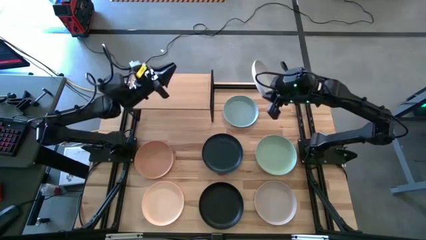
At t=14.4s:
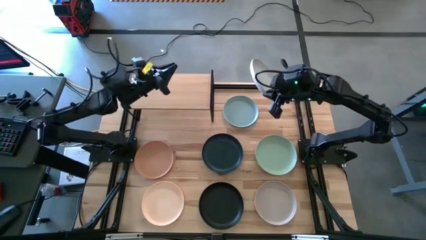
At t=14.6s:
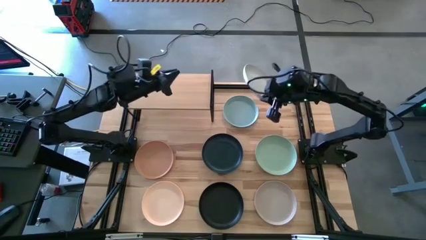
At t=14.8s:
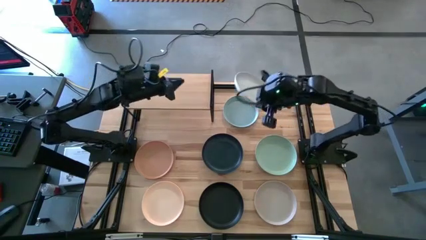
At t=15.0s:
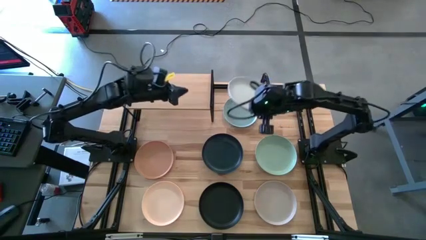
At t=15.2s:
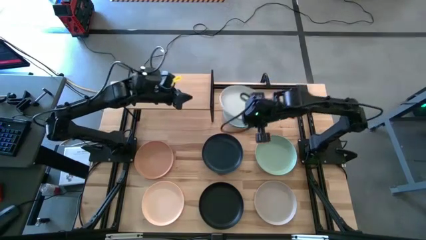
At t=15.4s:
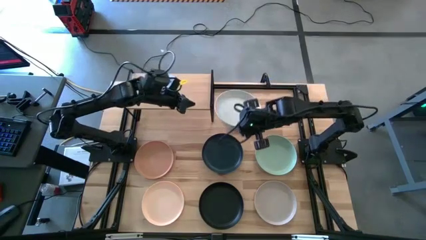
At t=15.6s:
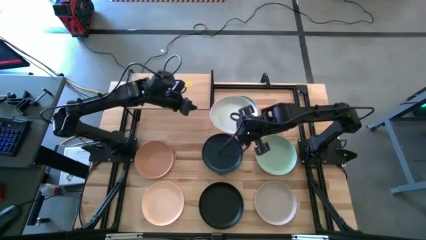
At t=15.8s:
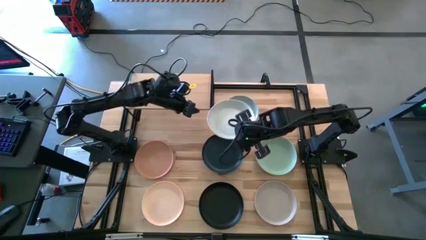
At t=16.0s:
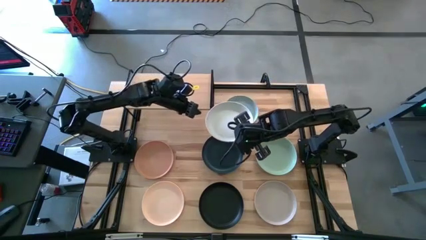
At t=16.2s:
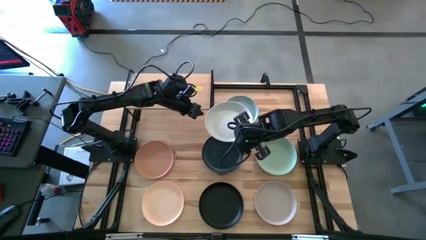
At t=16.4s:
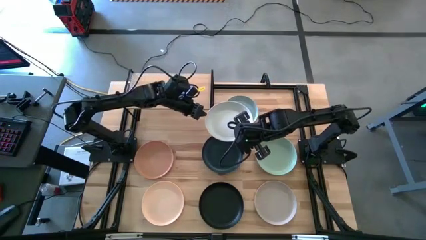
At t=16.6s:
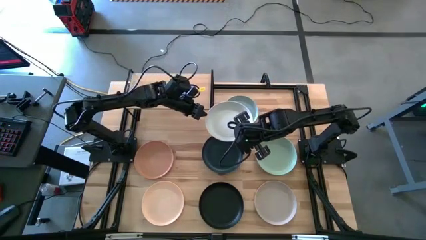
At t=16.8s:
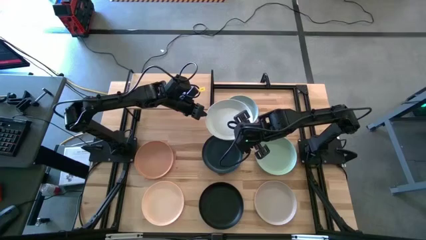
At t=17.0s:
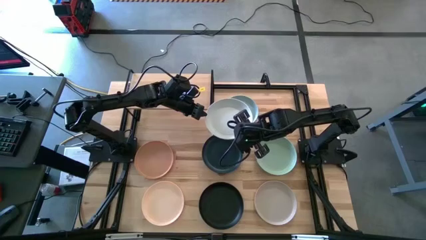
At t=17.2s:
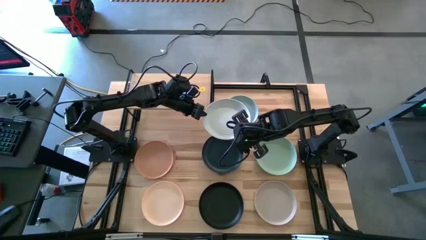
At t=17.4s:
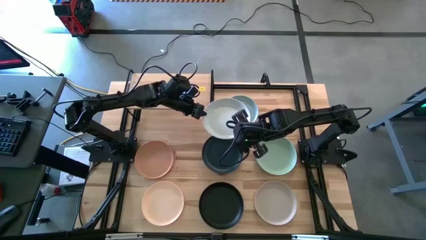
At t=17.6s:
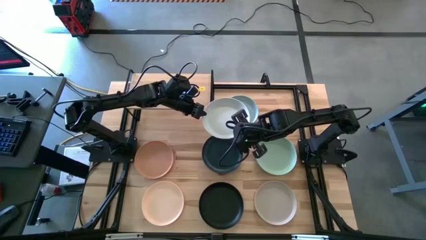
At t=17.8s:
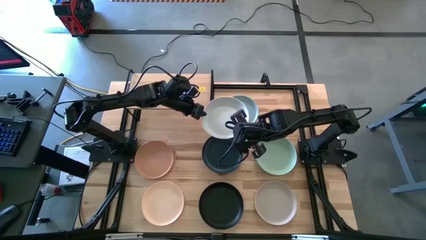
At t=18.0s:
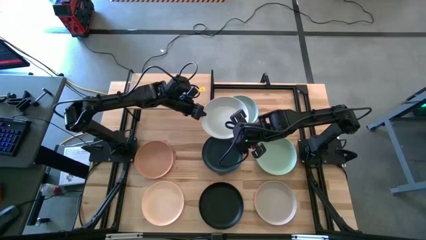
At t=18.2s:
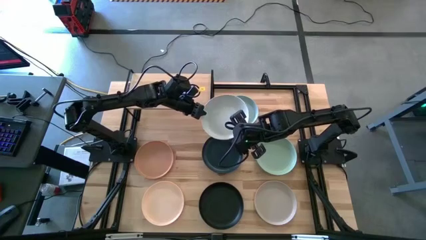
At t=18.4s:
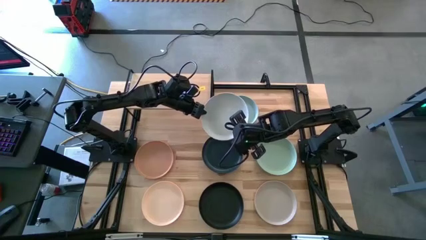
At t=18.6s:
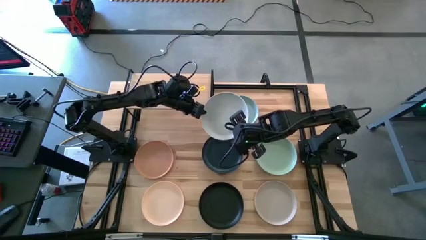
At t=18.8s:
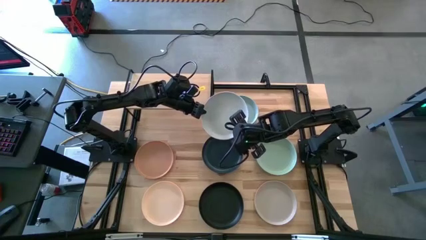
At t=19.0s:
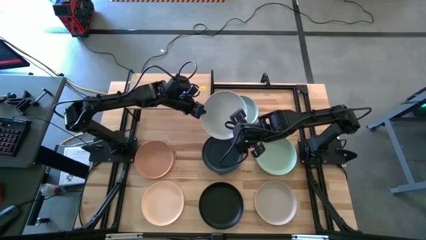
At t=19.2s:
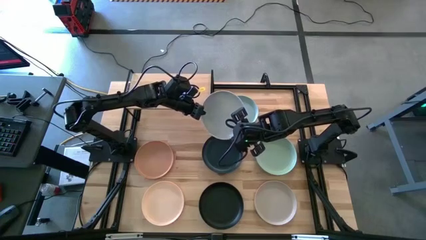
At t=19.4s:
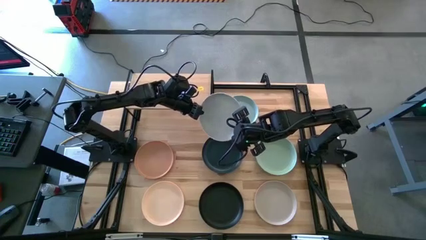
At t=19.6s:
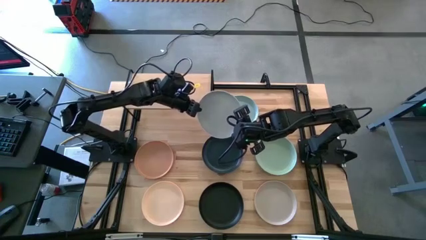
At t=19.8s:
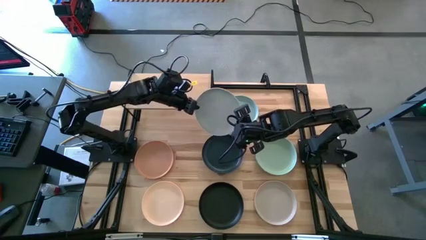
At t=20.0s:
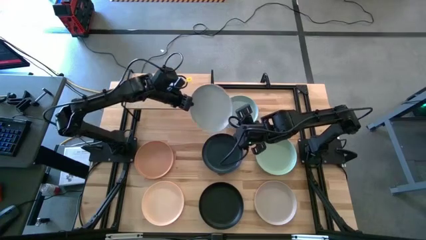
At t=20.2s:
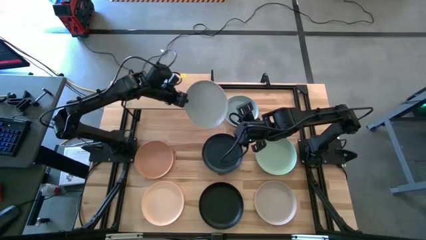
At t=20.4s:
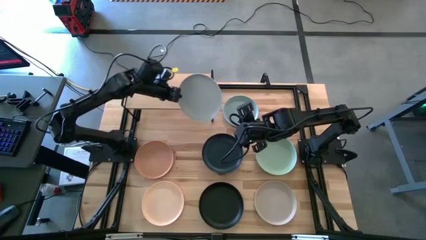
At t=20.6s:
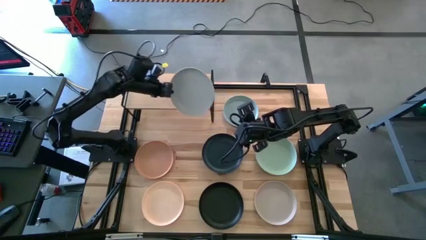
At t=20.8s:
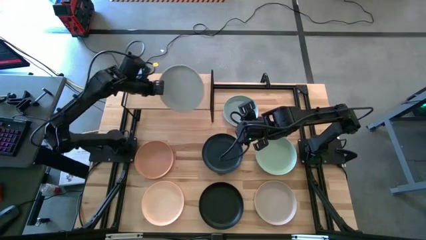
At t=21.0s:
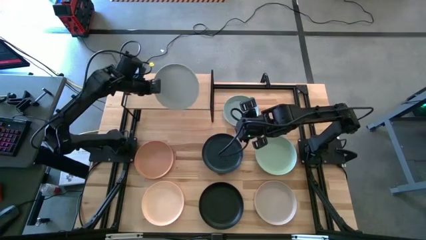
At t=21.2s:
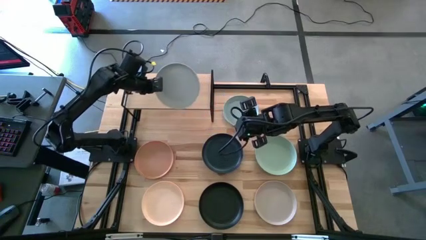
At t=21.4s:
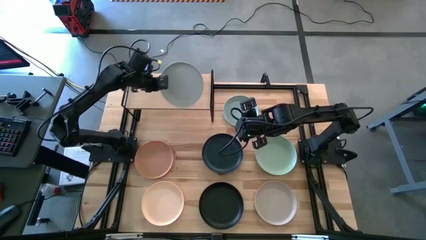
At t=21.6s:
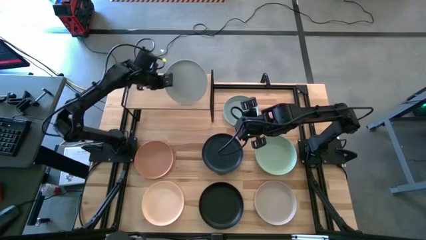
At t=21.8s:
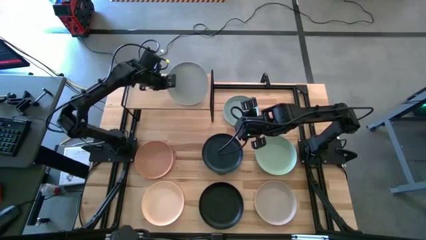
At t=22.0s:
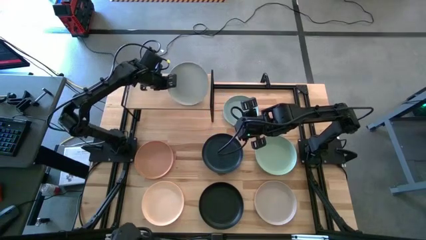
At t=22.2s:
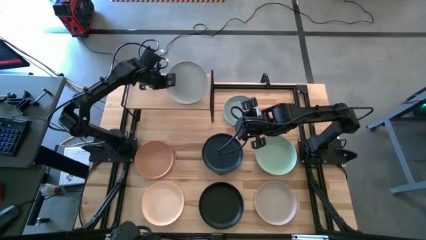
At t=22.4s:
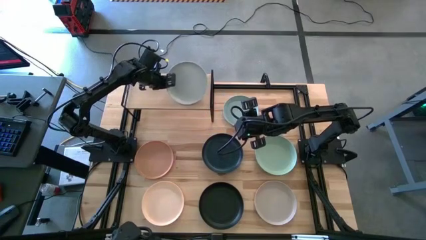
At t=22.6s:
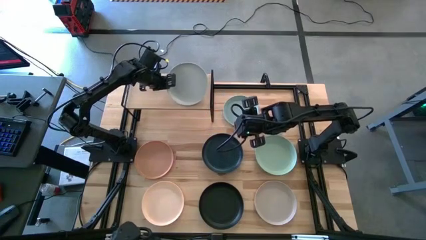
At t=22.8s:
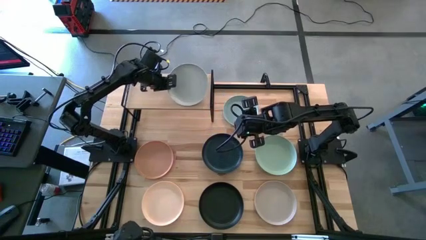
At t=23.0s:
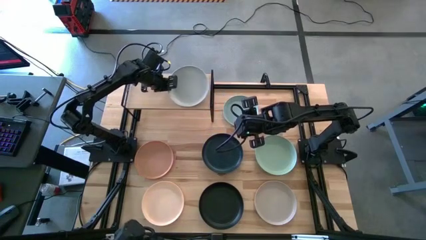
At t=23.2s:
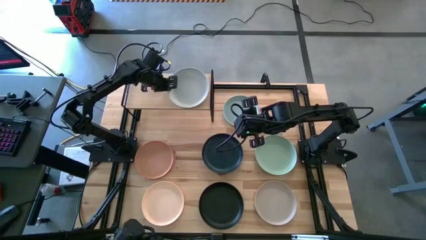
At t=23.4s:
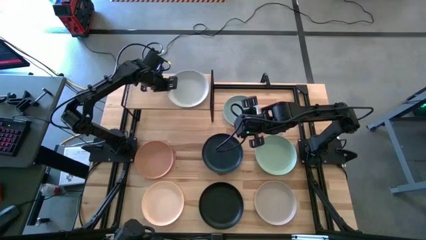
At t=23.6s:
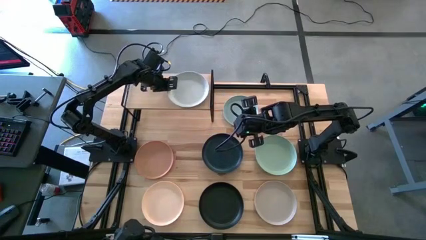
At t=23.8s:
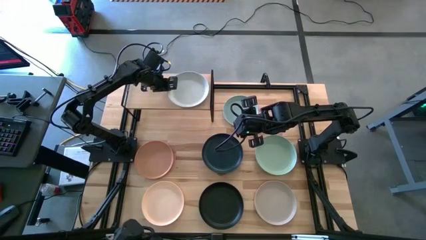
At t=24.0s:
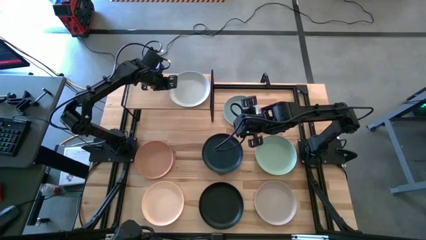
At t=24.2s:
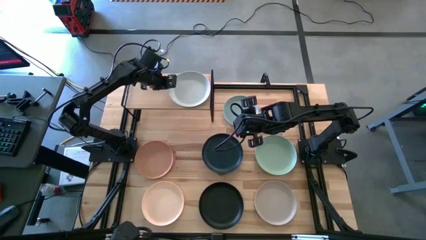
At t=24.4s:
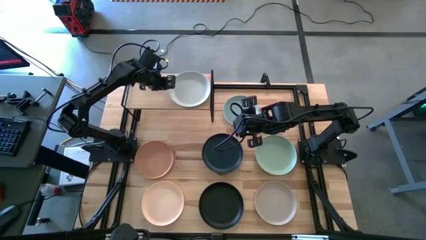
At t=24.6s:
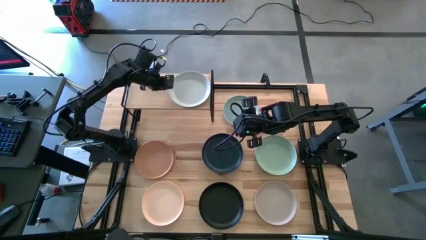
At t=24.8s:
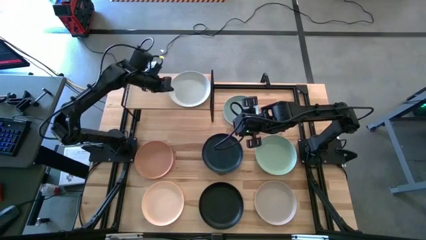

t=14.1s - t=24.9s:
Task: Place and stack plates onto a shelf
Put the white plate on the shelf

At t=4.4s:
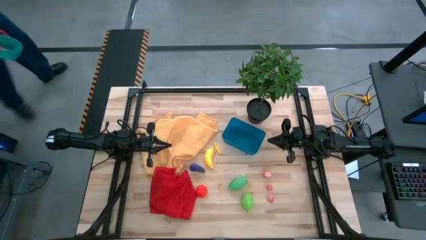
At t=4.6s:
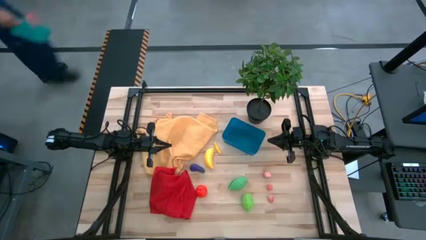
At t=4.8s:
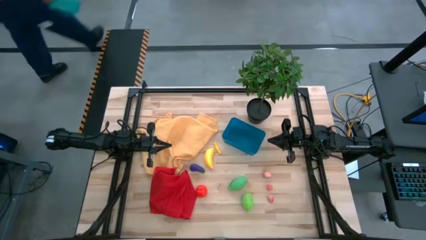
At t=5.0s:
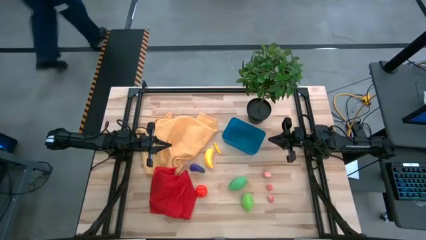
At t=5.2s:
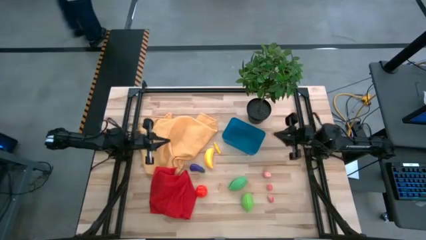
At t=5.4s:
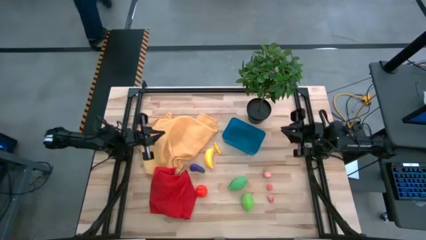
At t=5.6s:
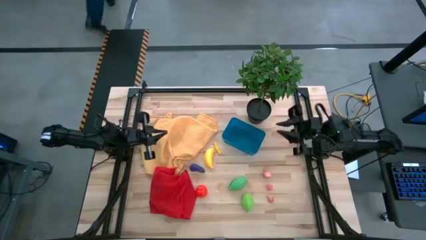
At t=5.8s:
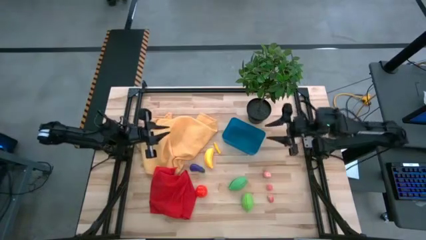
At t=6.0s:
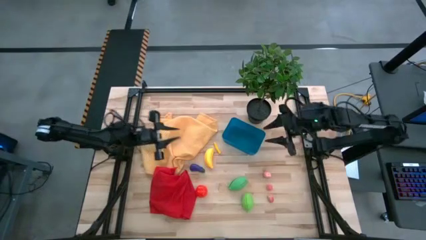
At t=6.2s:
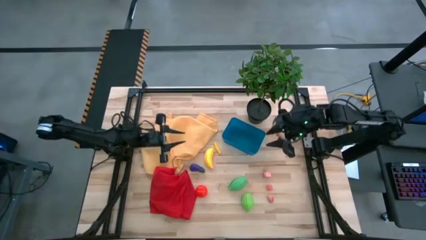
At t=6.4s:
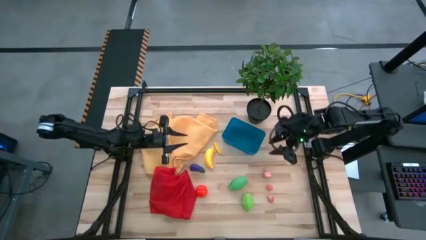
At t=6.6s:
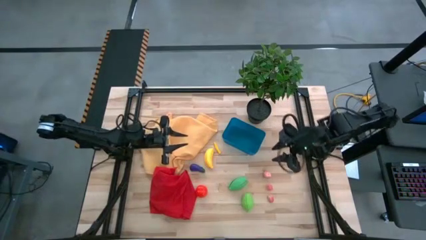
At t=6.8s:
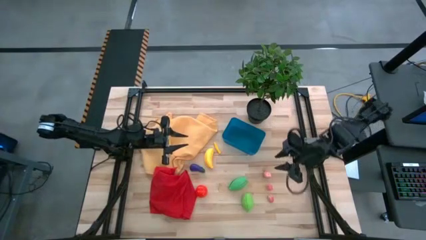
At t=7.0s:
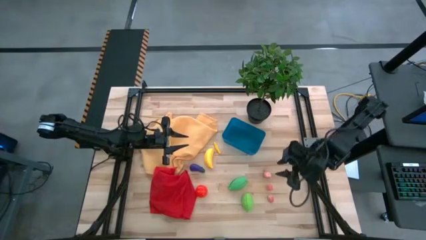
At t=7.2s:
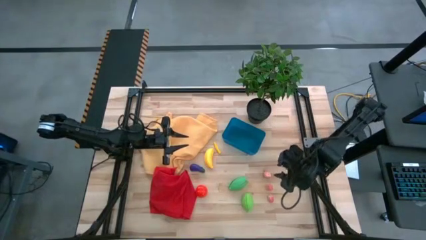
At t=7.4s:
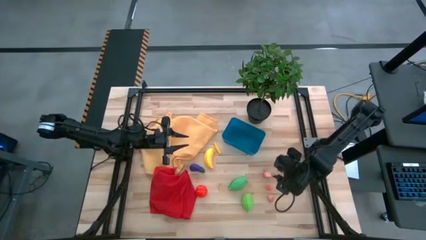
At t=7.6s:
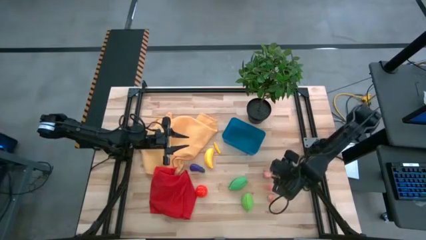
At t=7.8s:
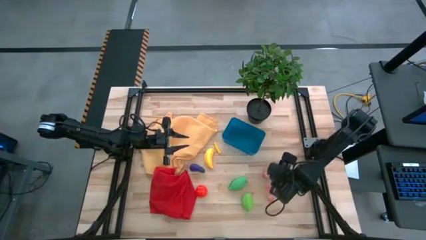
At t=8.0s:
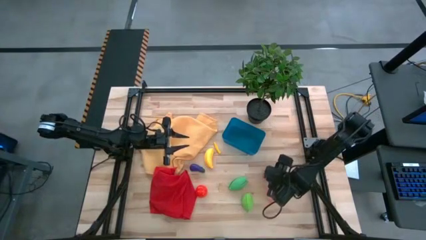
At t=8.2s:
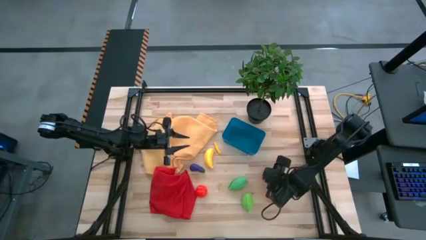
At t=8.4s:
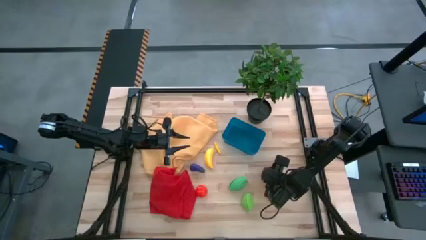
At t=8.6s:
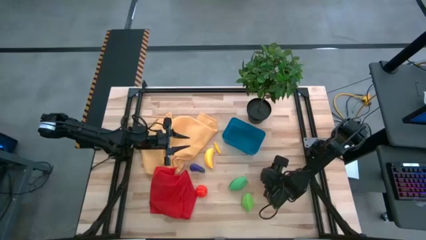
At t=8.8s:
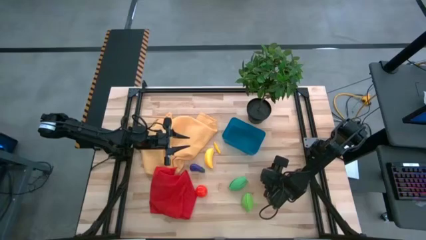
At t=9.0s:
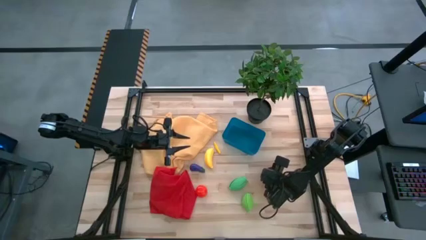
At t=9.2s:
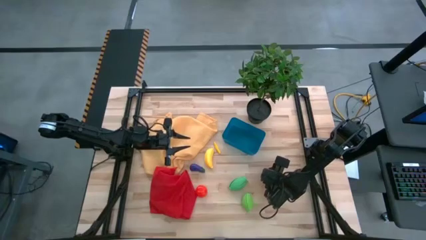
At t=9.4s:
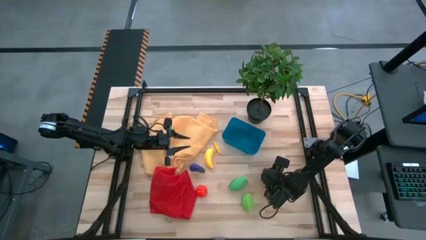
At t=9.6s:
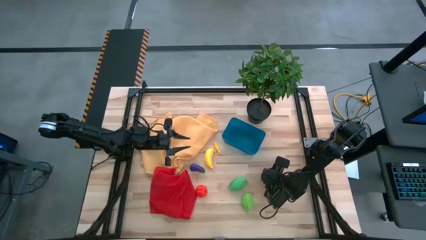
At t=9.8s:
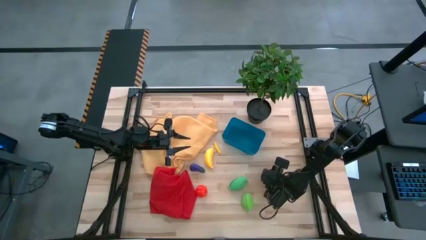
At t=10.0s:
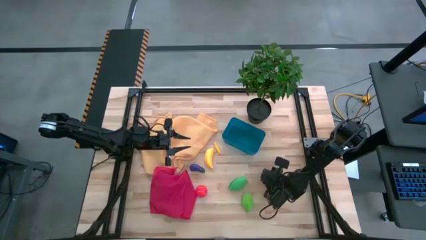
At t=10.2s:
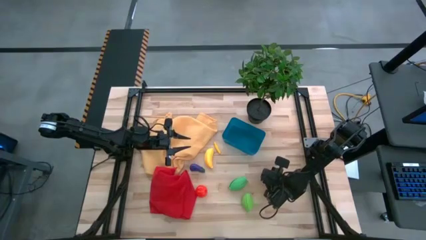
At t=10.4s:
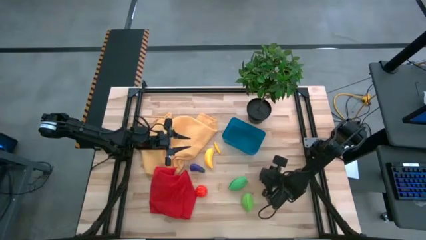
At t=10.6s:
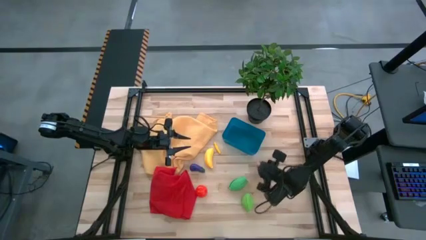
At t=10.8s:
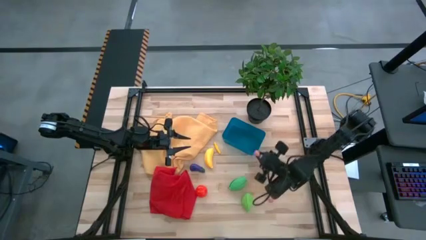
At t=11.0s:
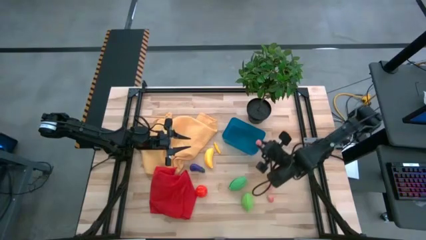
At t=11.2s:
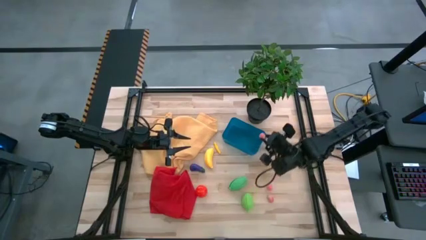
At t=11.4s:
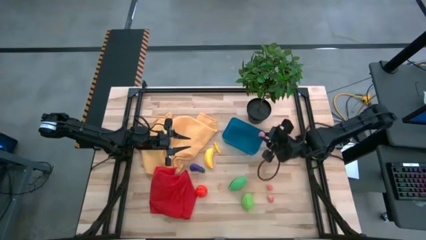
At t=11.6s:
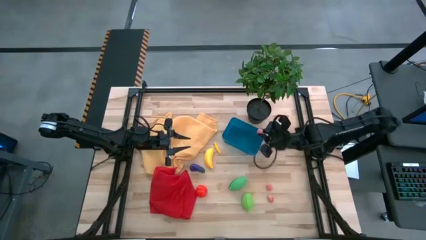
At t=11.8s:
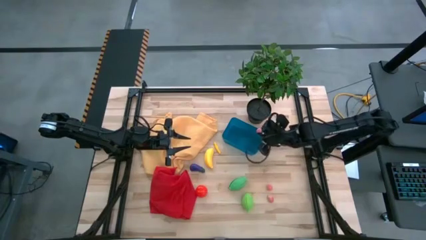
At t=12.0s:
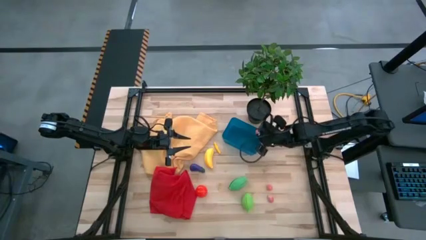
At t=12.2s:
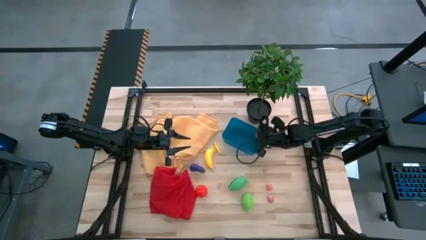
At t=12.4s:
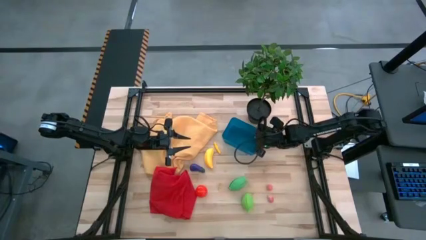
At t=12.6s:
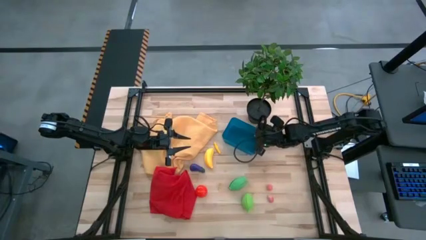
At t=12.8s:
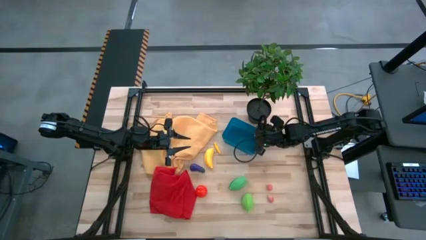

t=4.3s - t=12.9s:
Task: Pick and placing Produce into tupperware
Put the top pink peach into the blue bin
